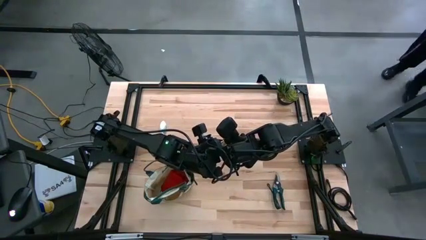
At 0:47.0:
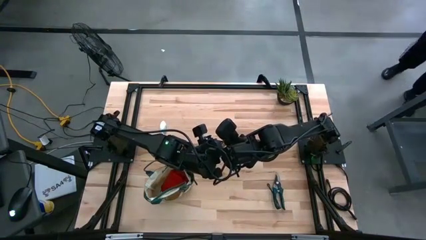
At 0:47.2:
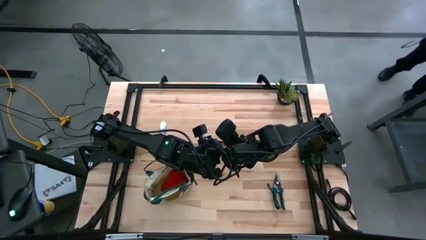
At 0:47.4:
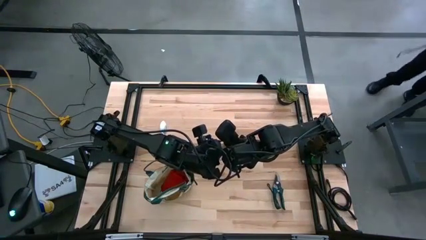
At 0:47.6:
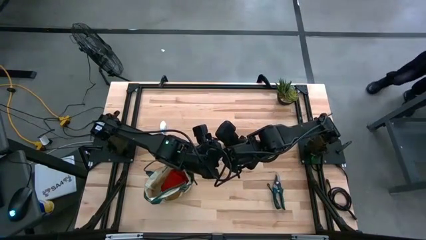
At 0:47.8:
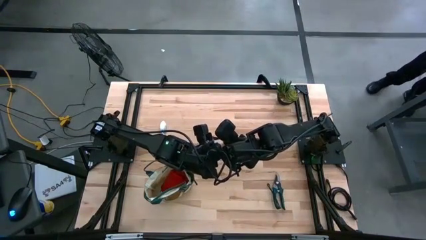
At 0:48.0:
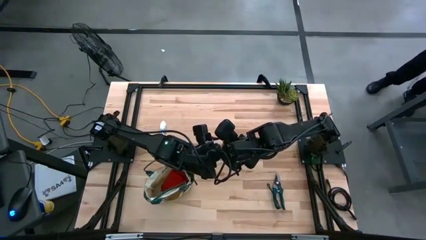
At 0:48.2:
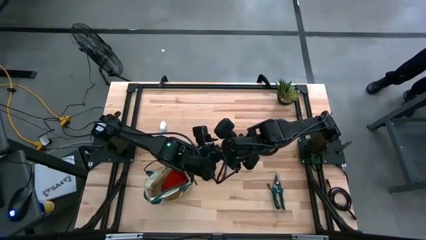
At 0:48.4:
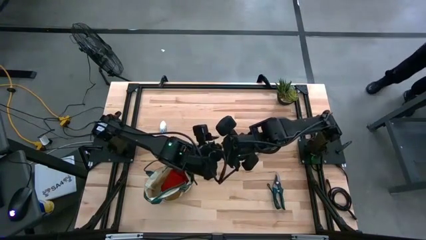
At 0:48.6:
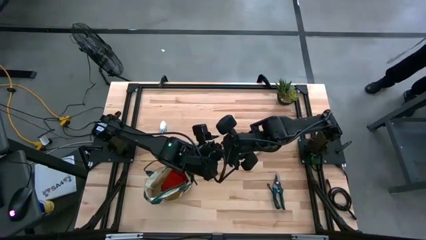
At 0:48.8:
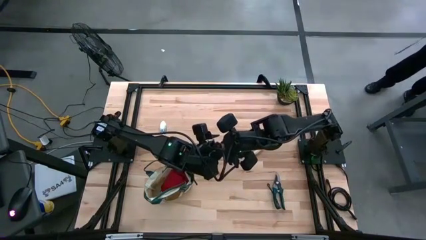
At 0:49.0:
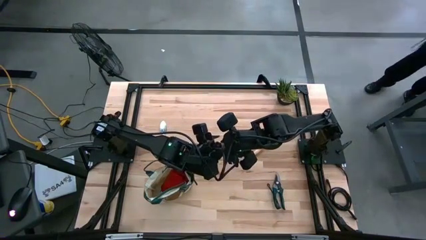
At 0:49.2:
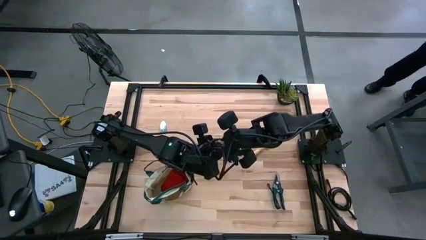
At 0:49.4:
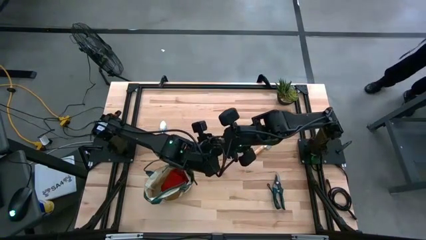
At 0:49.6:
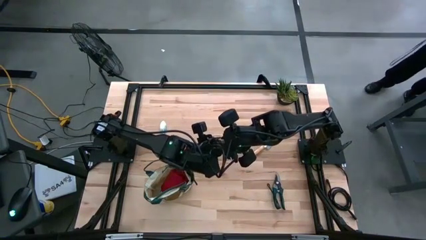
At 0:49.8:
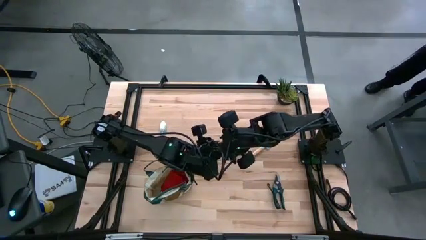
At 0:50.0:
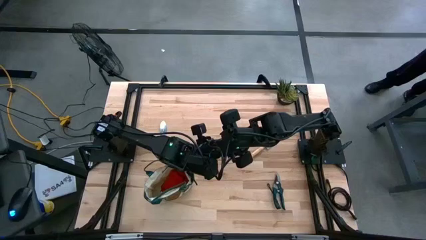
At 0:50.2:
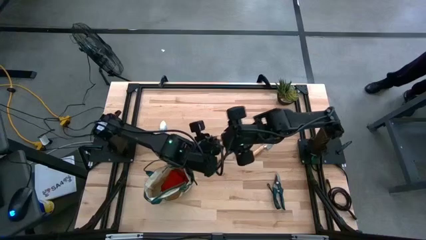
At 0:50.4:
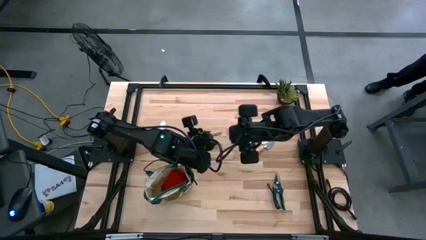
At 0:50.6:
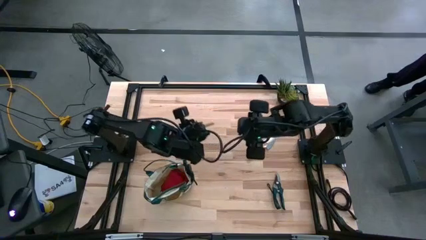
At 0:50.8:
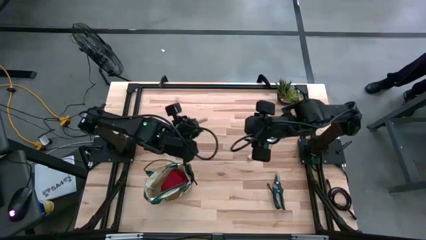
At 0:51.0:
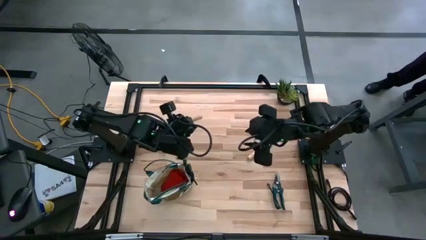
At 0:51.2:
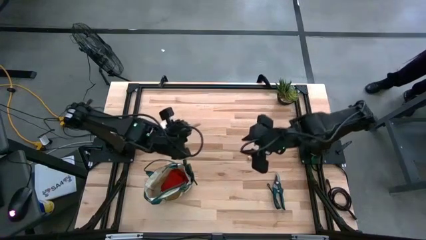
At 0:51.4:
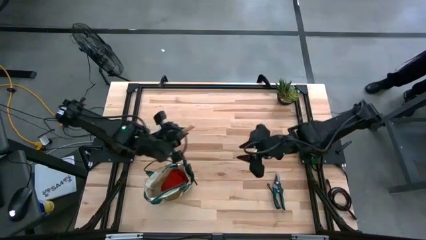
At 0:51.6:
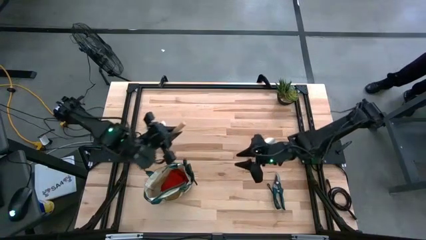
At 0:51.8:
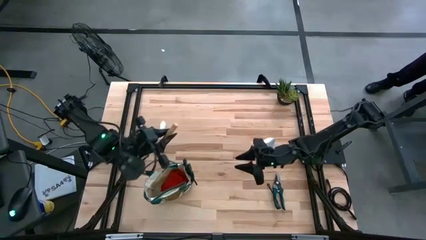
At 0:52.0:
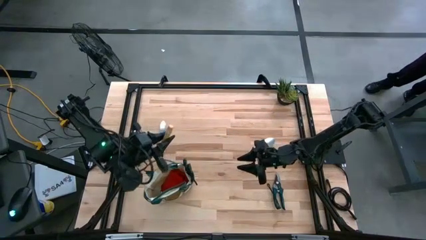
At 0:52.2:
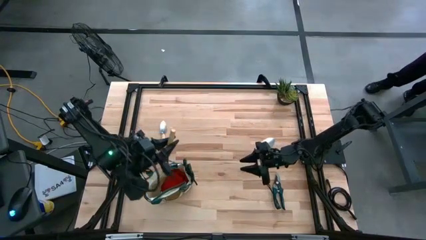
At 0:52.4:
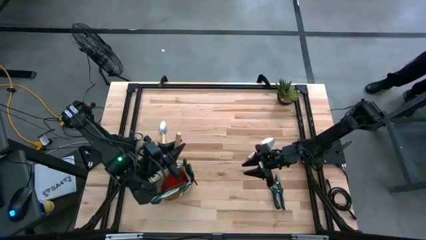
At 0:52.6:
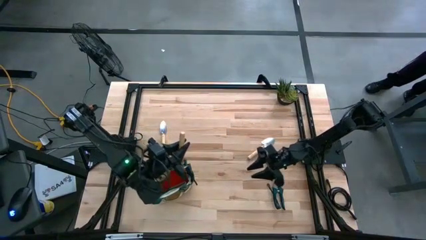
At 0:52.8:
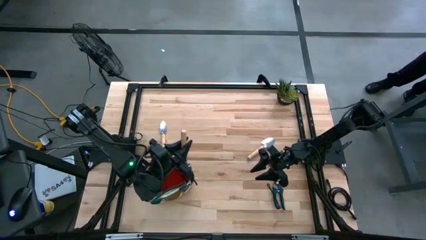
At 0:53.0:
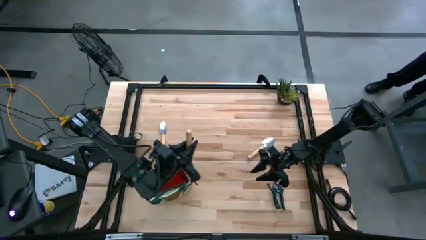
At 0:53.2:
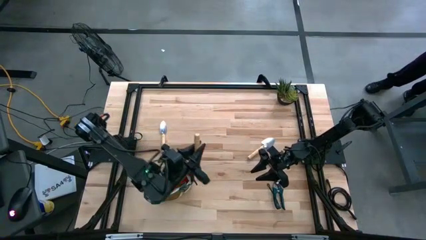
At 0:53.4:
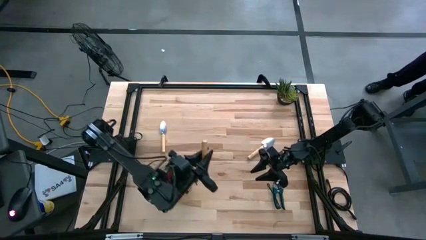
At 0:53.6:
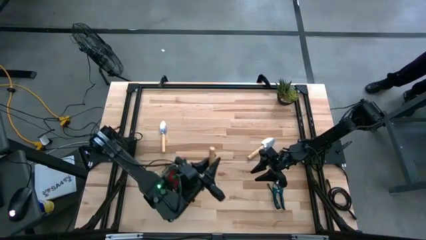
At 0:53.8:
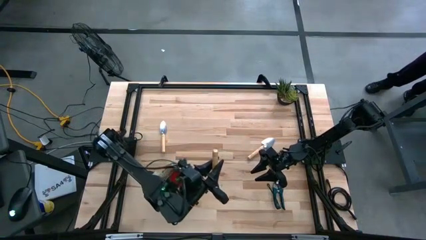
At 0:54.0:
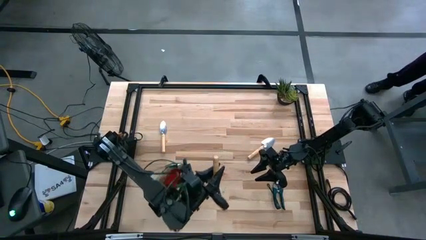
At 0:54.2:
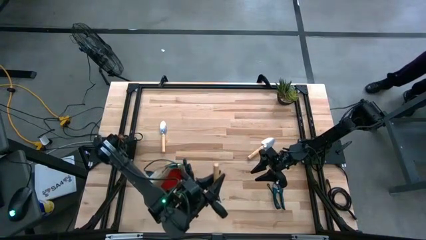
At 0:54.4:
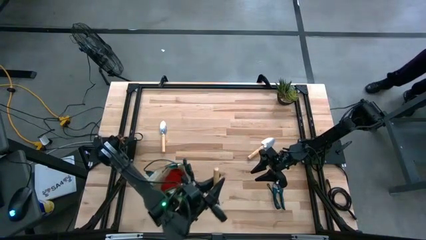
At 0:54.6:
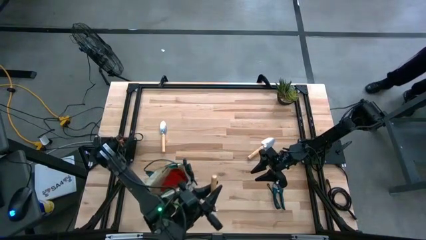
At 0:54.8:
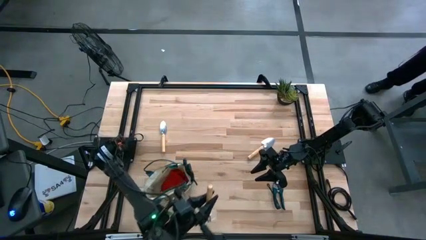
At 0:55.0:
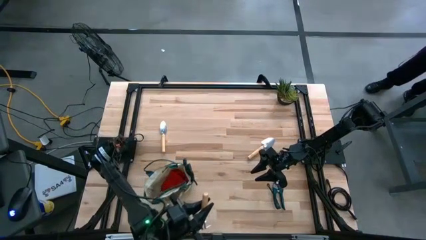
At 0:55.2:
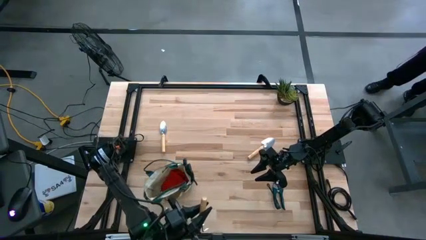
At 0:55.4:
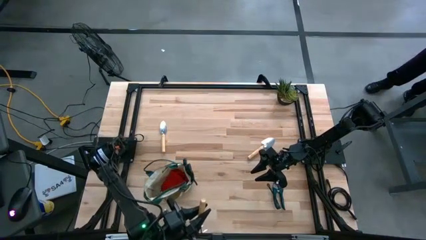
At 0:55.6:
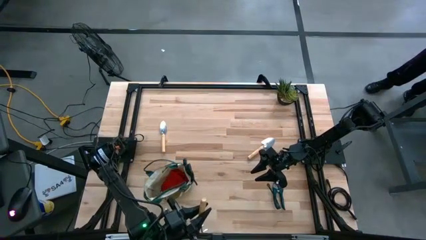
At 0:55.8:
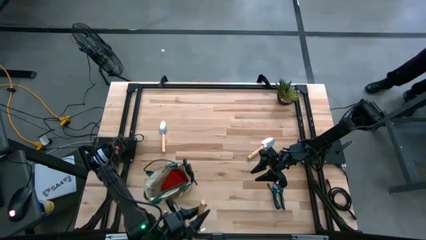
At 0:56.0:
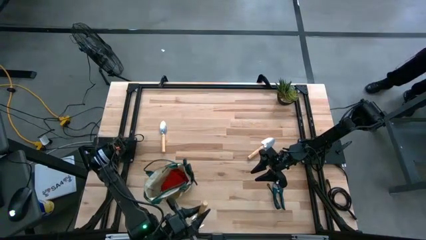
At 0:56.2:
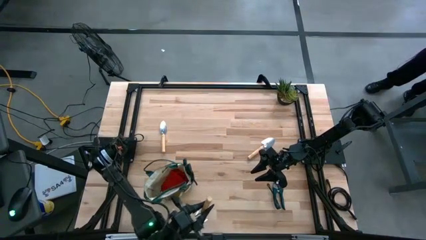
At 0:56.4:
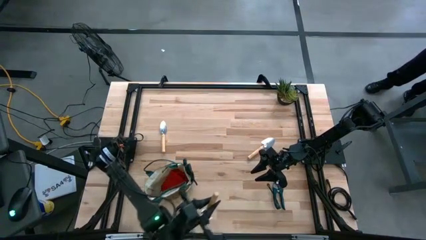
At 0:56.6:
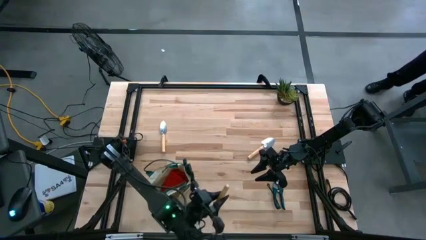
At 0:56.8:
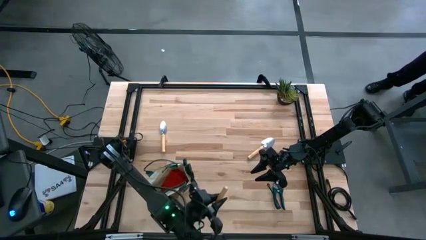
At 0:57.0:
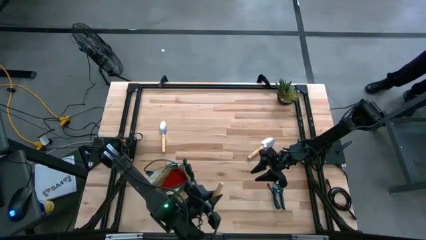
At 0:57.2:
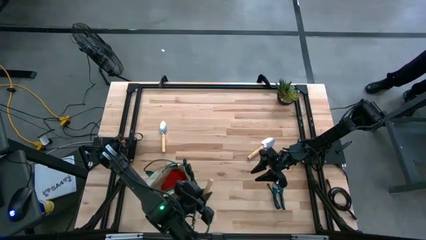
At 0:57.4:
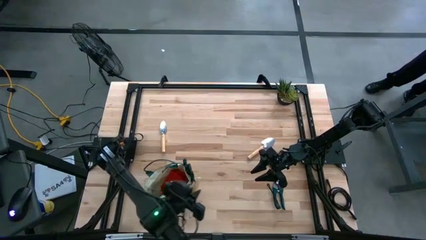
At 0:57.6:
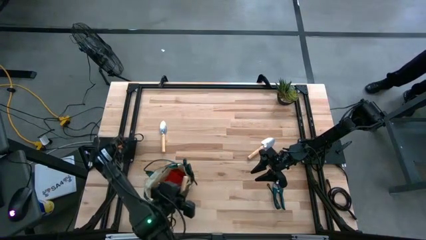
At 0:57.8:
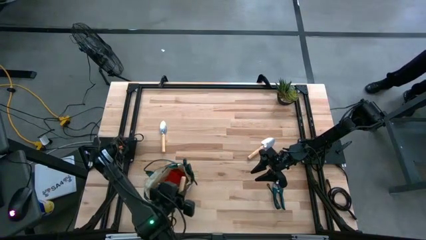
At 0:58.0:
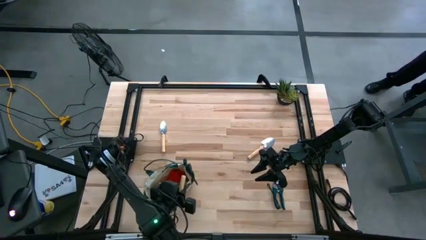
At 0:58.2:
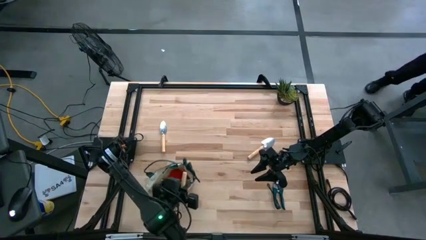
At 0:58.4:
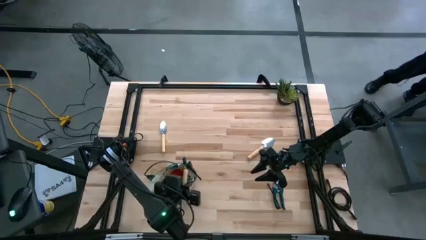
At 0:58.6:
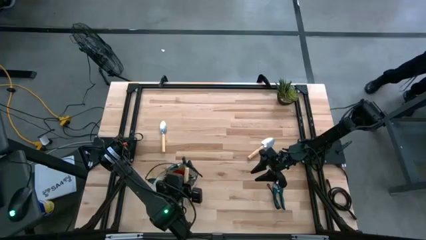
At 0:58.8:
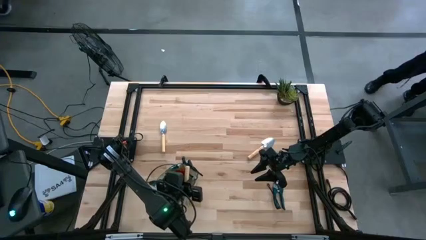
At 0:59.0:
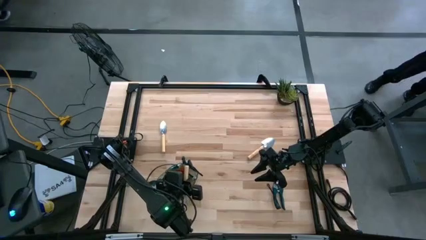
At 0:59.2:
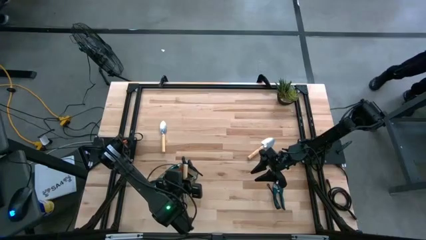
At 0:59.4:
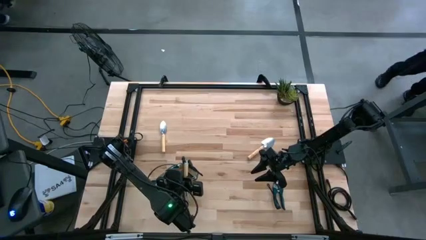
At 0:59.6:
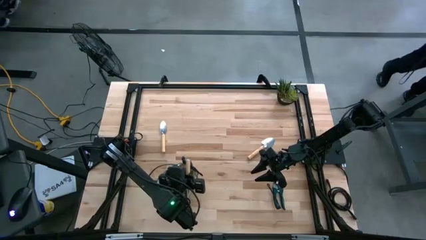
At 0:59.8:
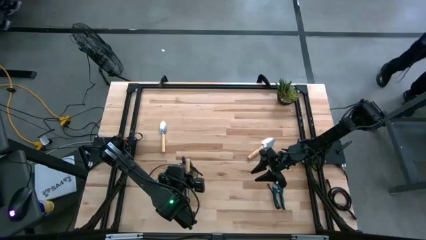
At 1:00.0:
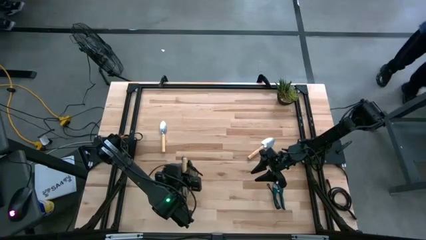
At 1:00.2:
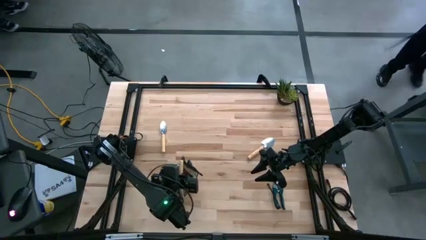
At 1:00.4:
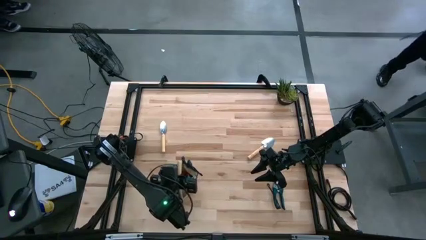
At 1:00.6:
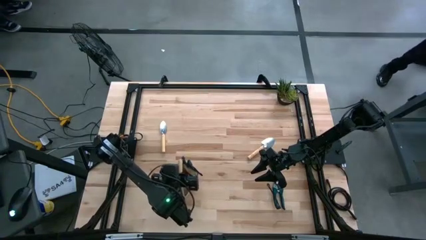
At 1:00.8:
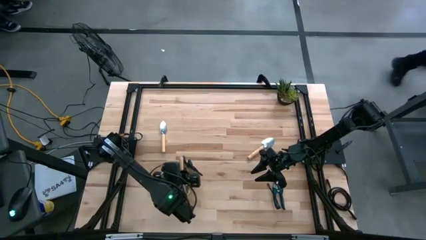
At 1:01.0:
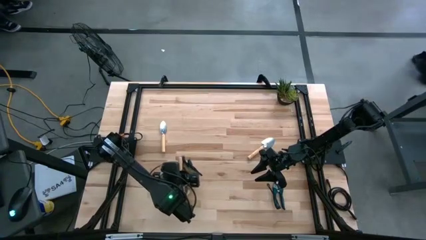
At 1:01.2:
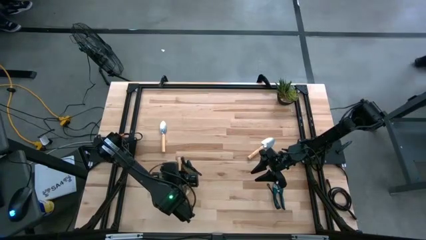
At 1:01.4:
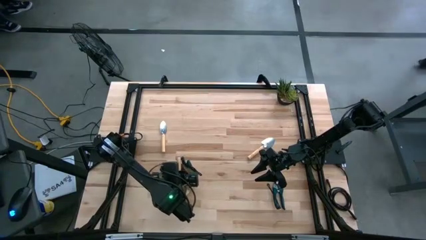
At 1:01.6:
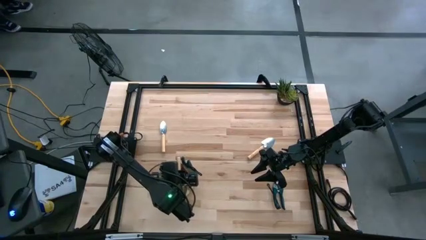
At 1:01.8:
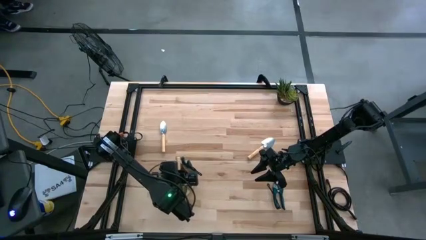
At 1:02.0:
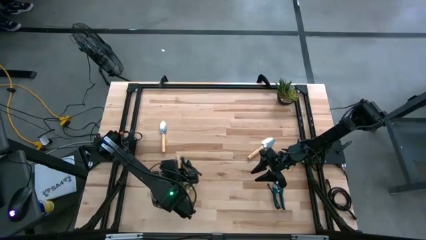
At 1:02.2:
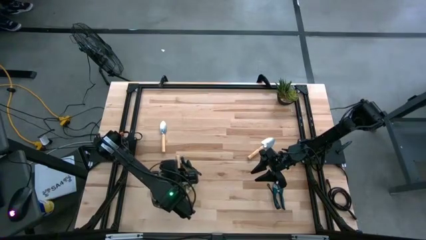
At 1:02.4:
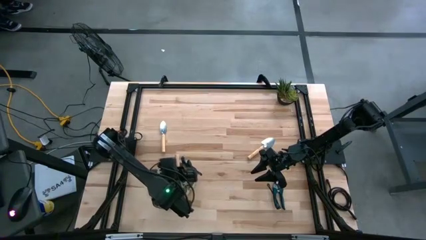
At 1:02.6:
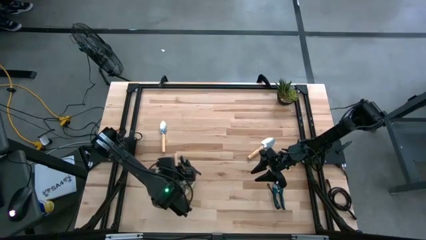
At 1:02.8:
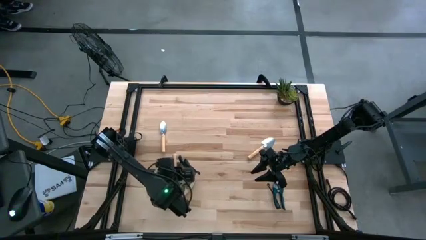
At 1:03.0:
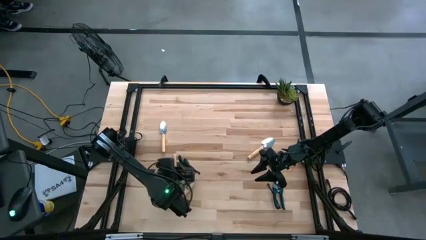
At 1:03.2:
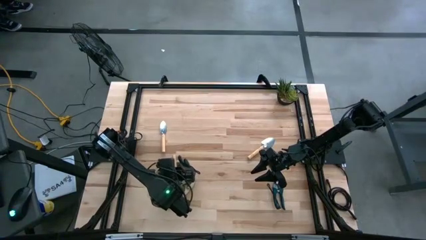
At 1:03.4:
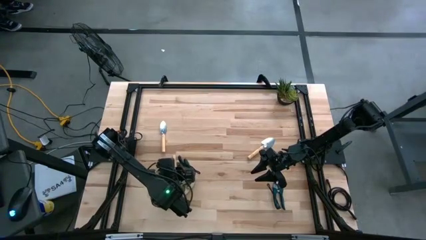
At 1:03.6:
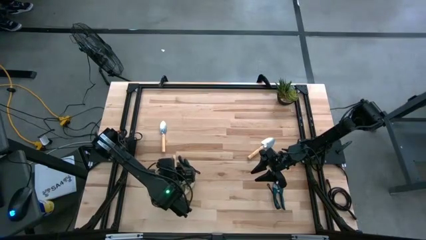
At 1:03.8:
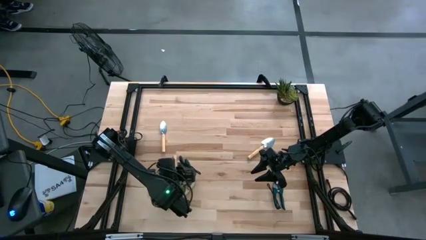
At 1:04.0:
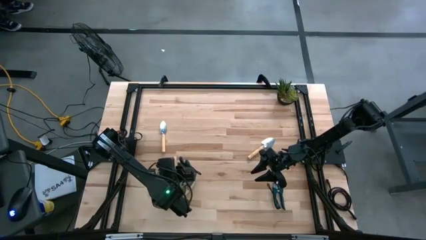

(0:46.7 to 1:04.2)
Task: Pick & Place Garden tools in Gardening bag
Put the hand rake into the gardening bag
